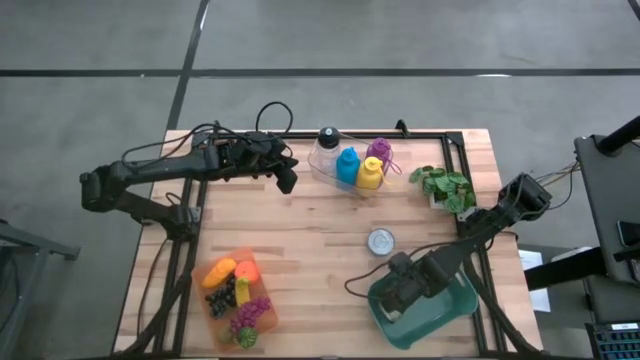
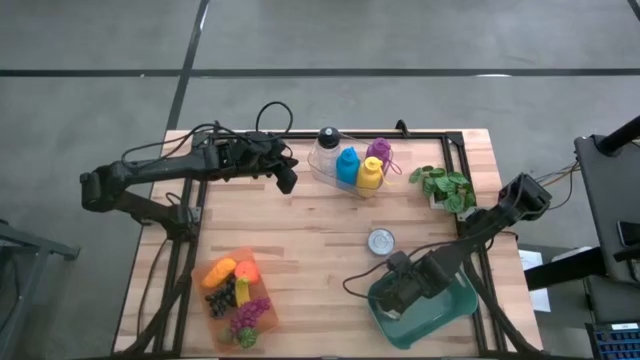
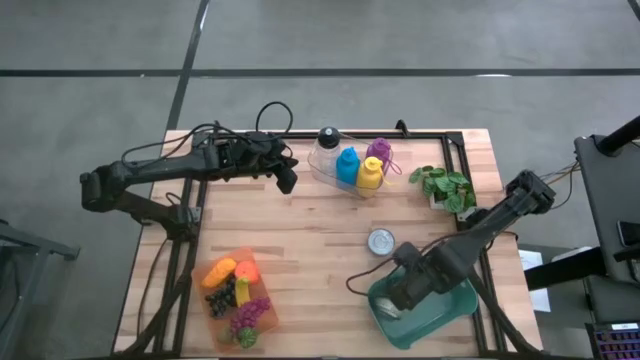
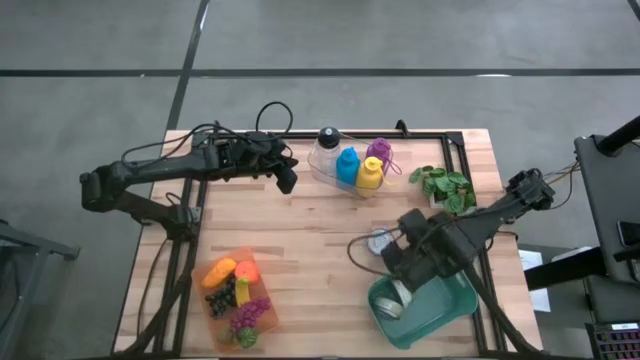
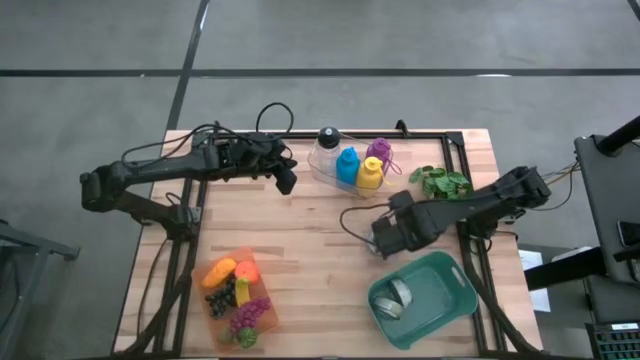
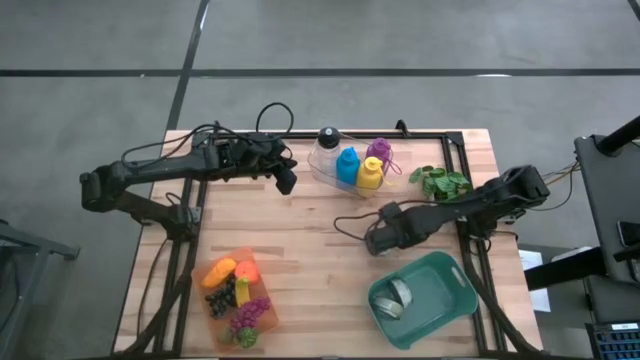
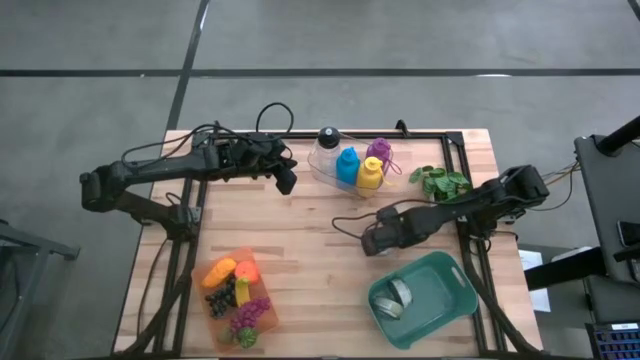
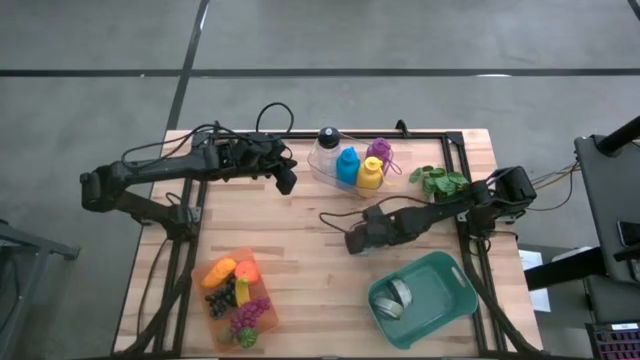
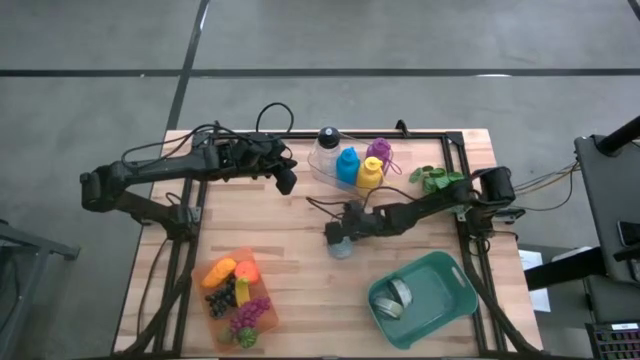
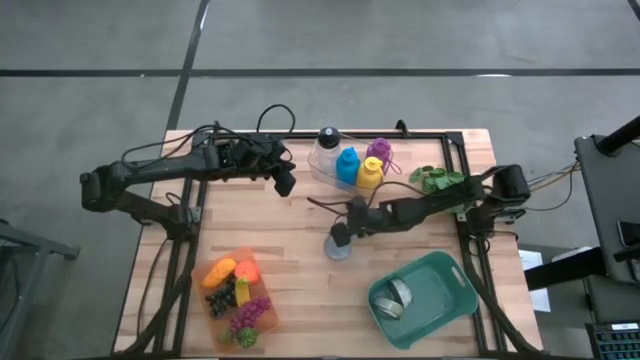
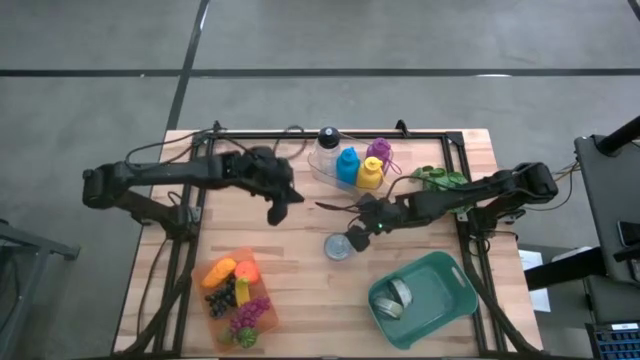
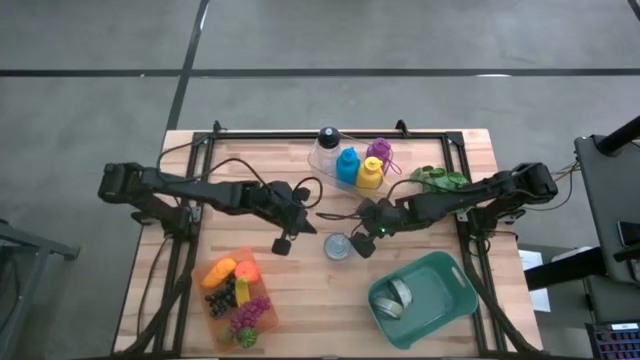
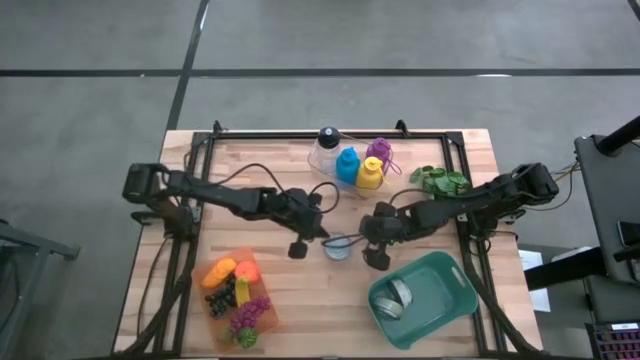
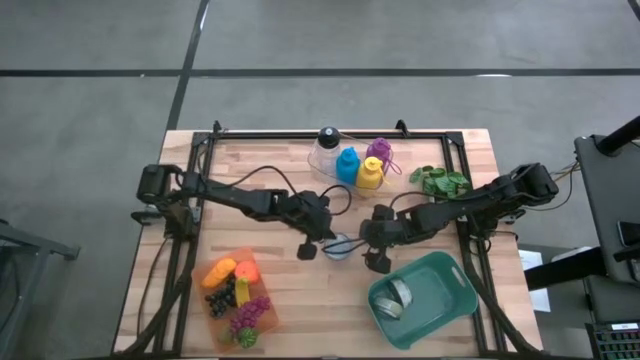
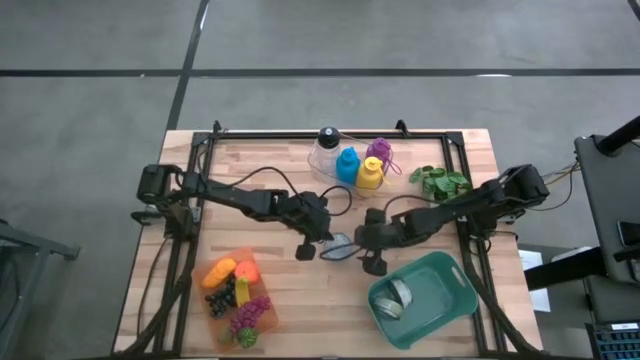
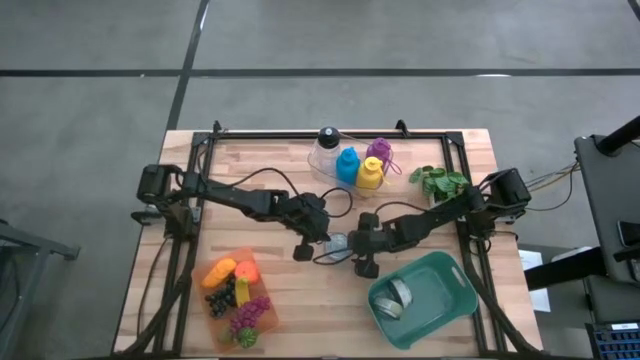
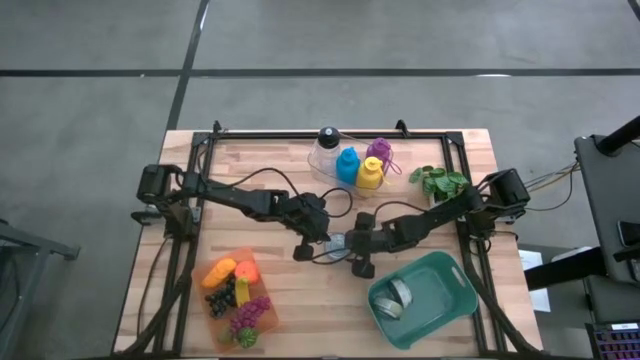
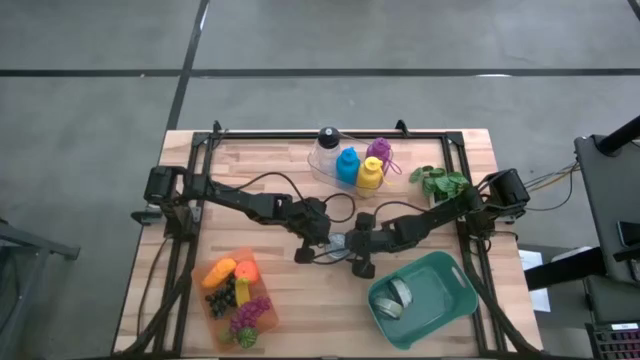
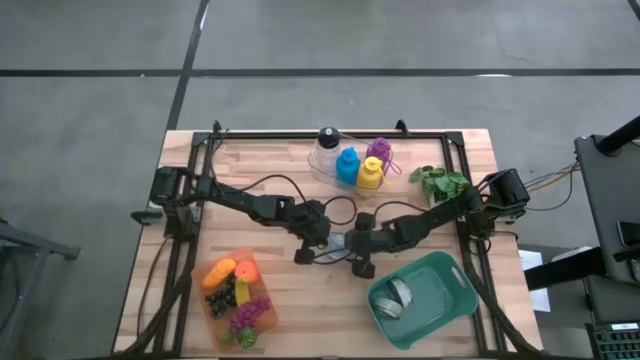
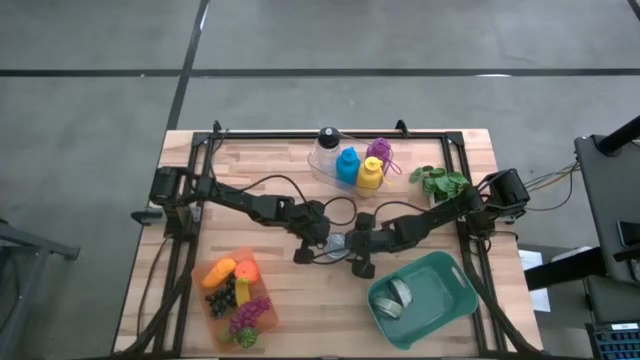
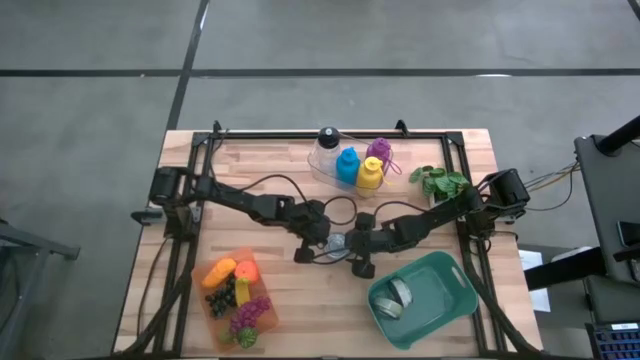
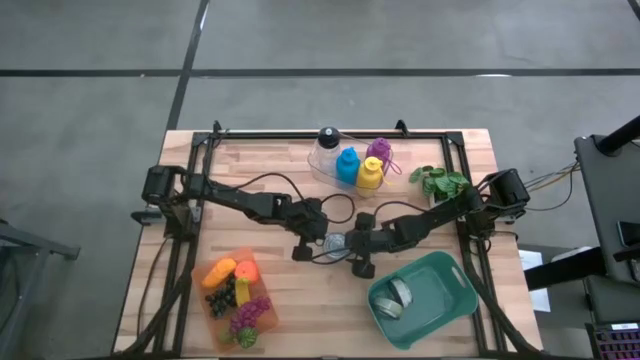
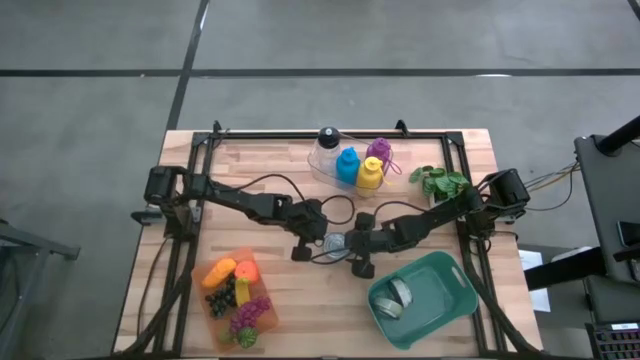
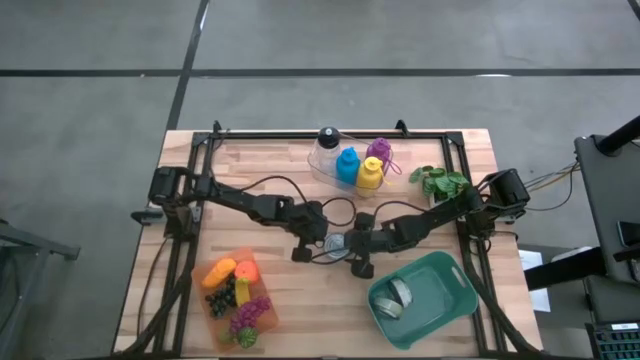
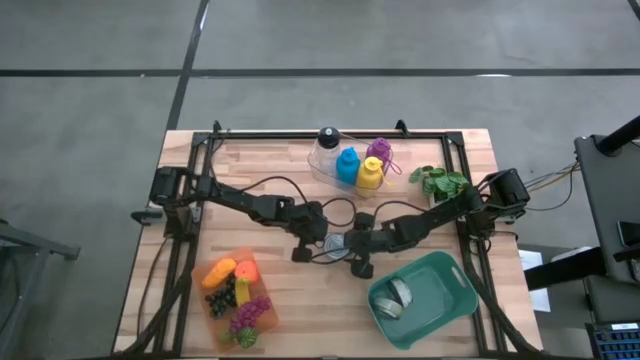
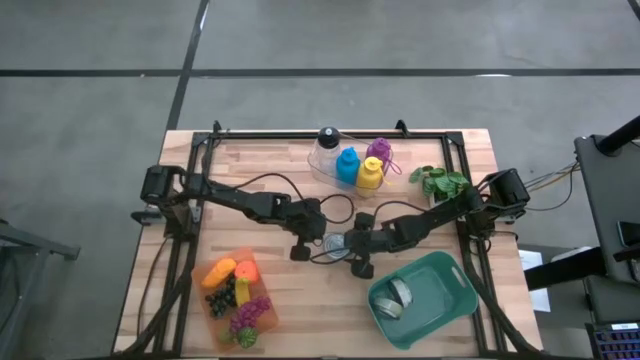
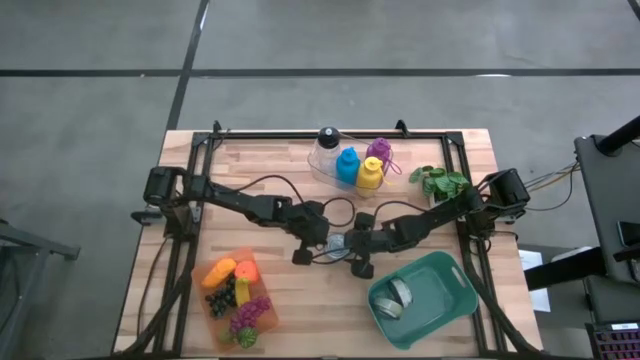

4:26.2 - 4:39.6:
Task: Pick & Place Food Item
Put the red tuna can into the green bin

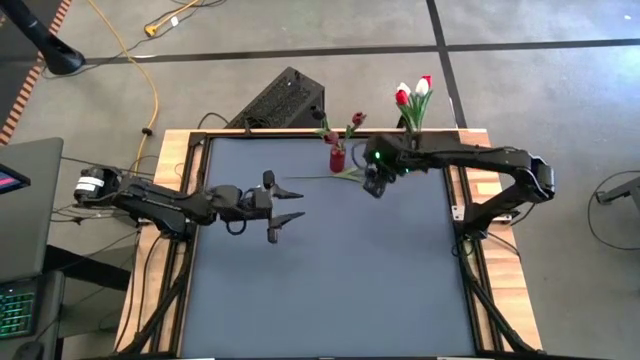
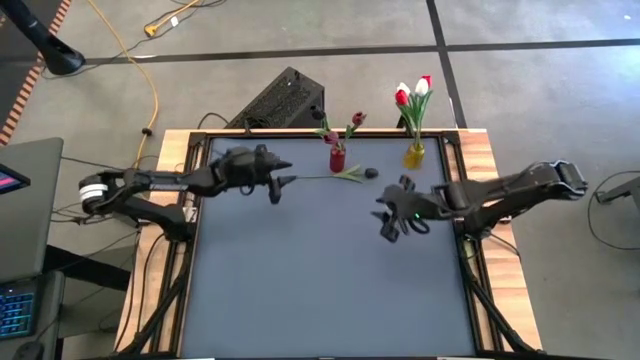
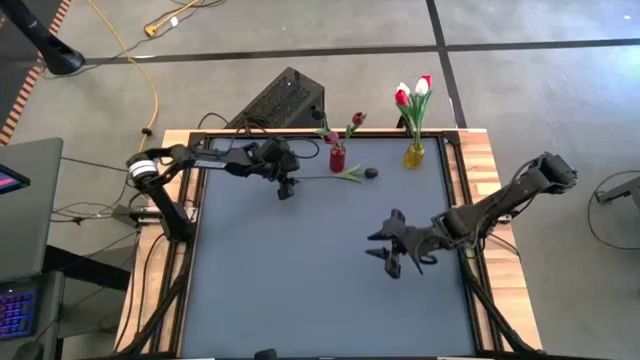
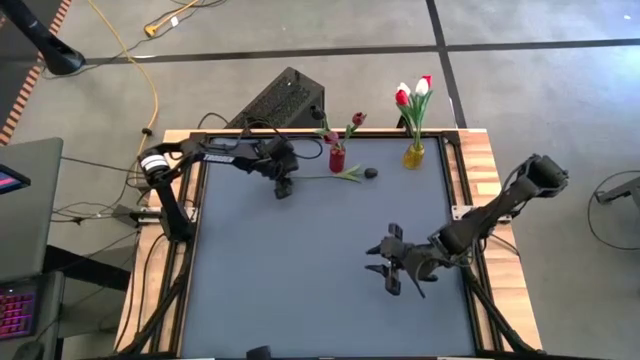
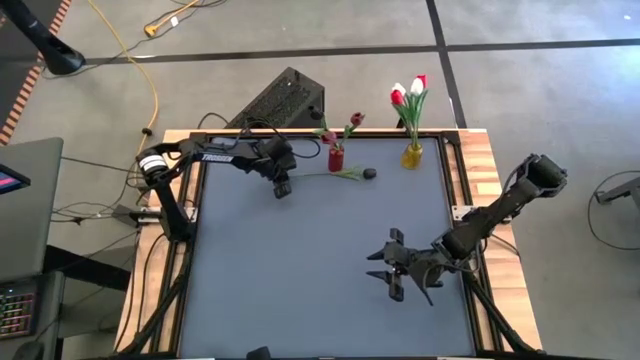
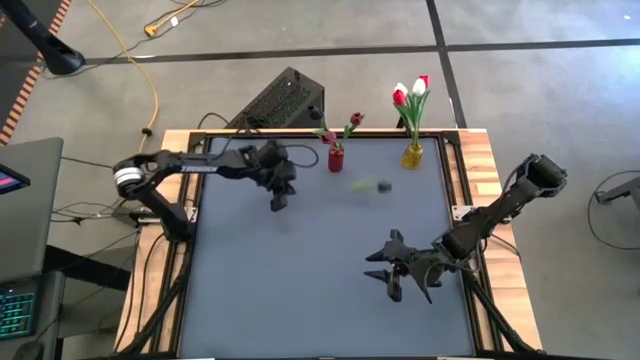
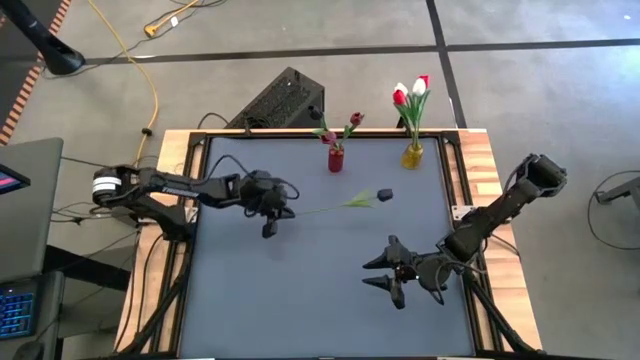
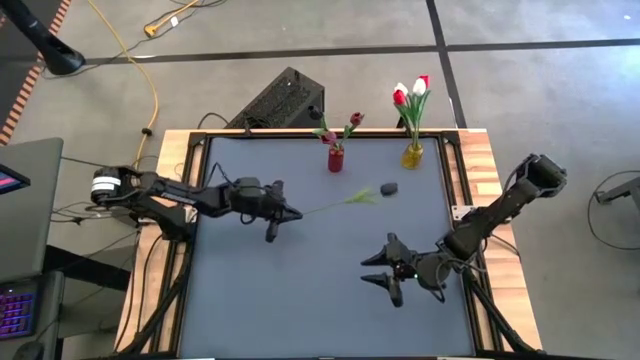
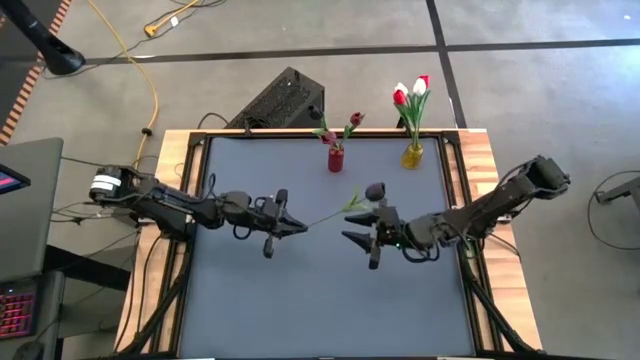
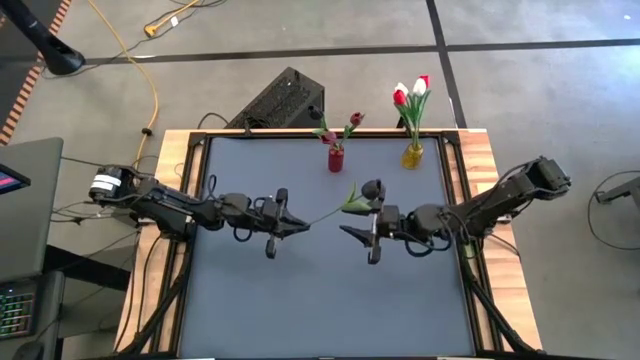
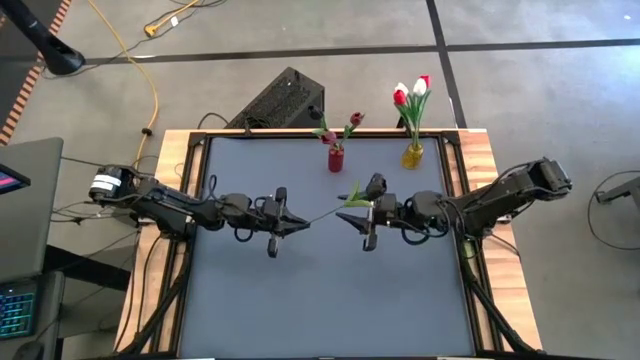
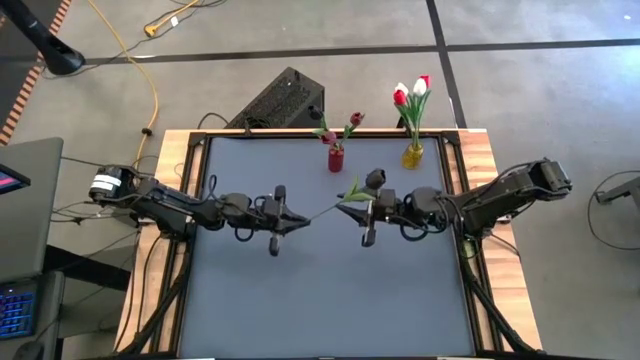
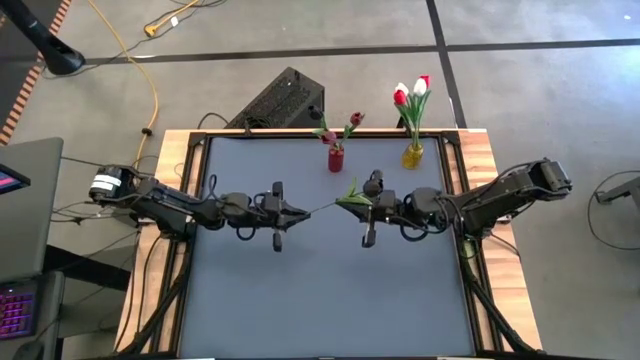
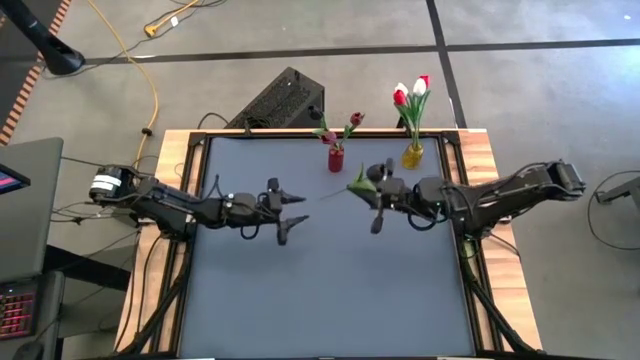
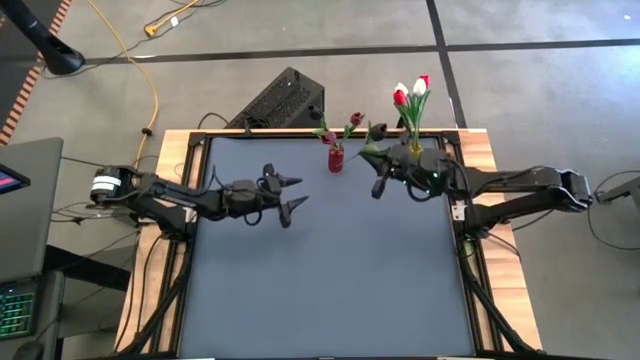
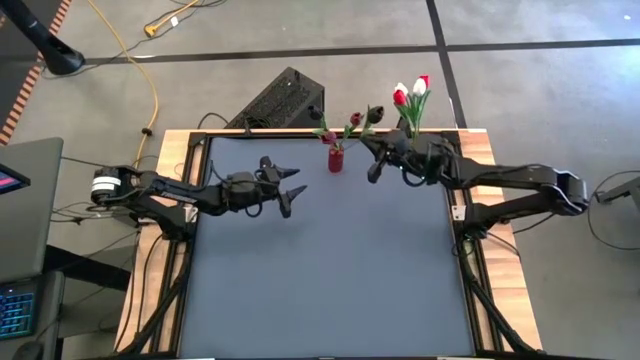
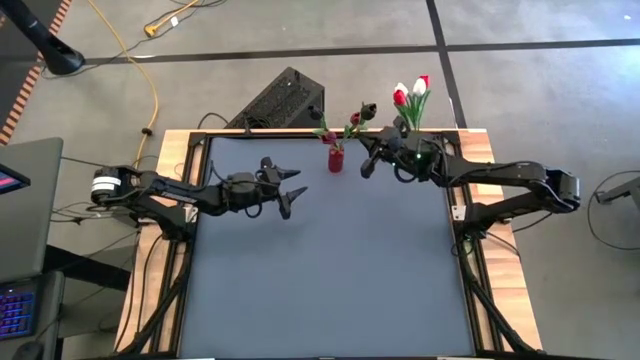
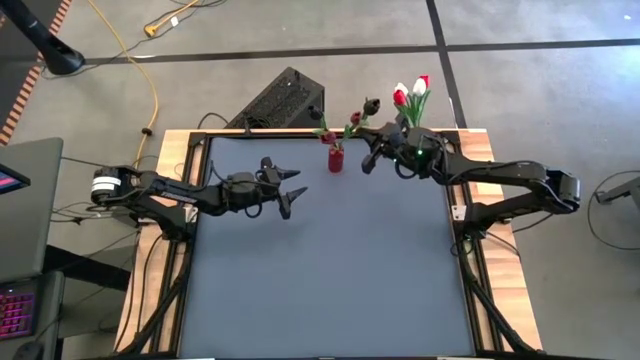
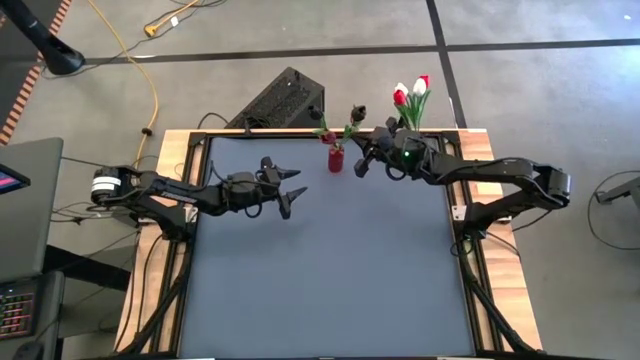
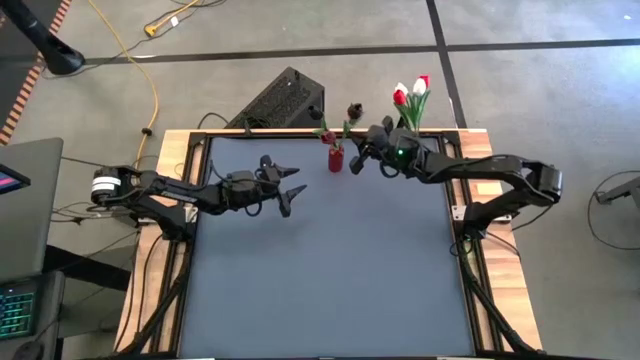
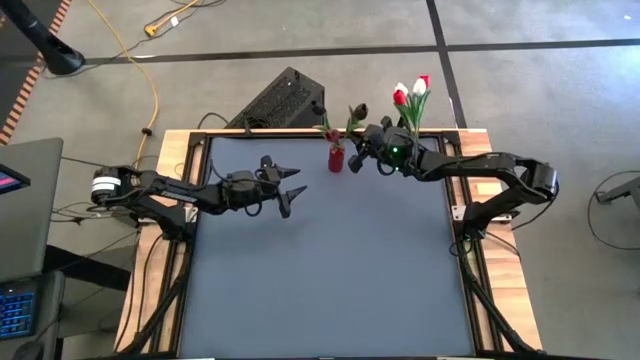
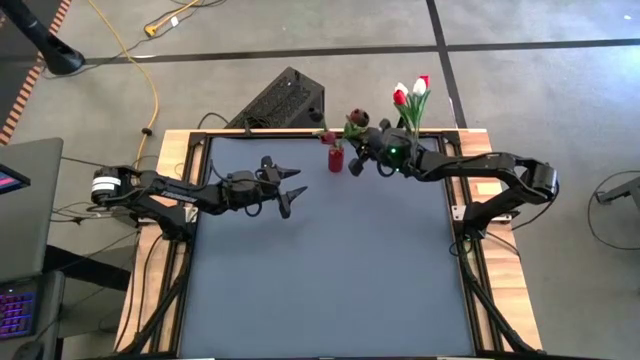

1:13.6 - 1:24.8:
Task: Sort flowers into vase by color
Put the black tulip into the red vase
